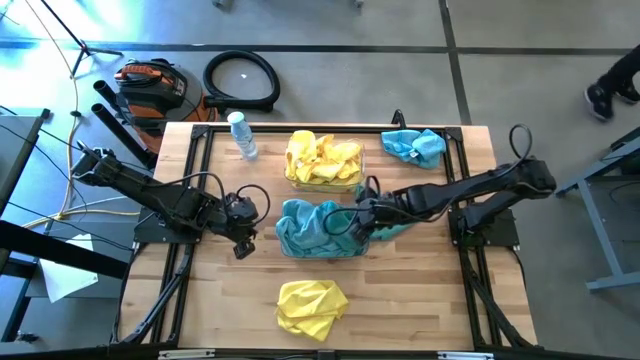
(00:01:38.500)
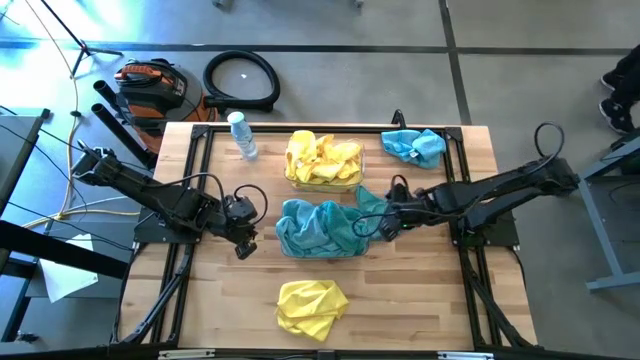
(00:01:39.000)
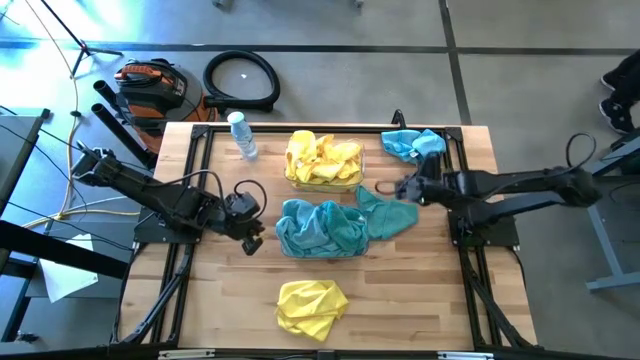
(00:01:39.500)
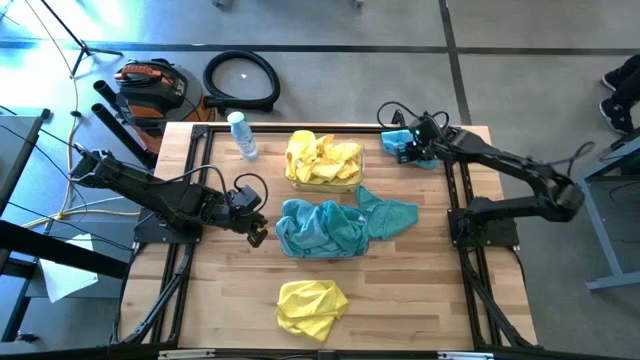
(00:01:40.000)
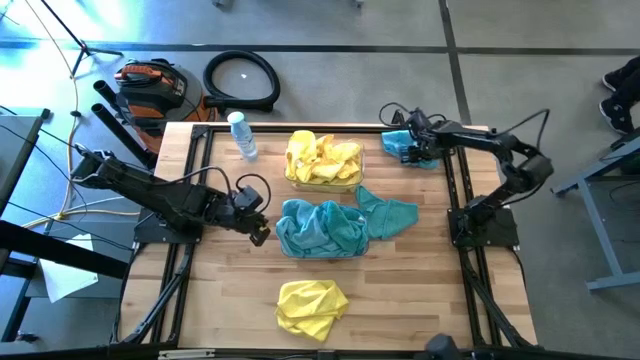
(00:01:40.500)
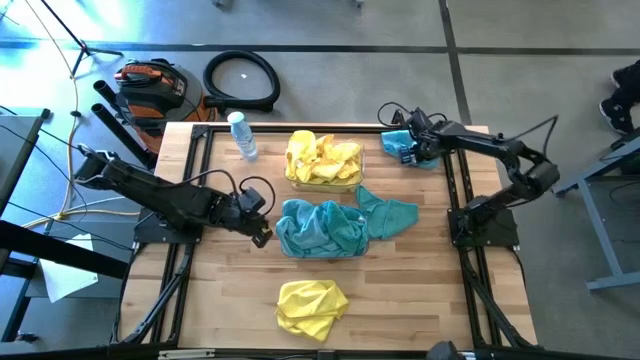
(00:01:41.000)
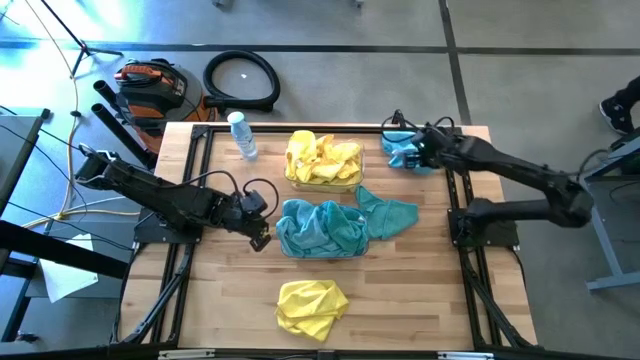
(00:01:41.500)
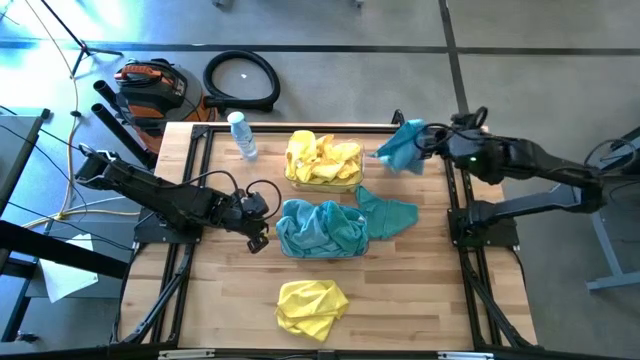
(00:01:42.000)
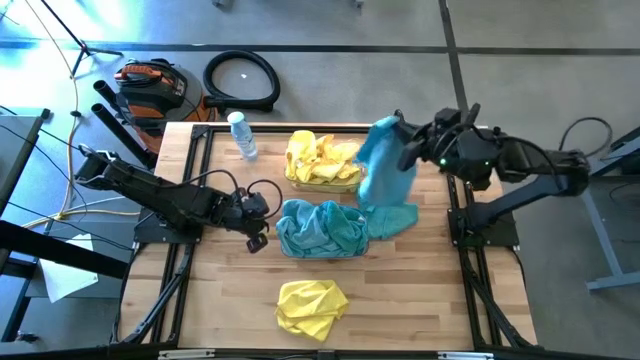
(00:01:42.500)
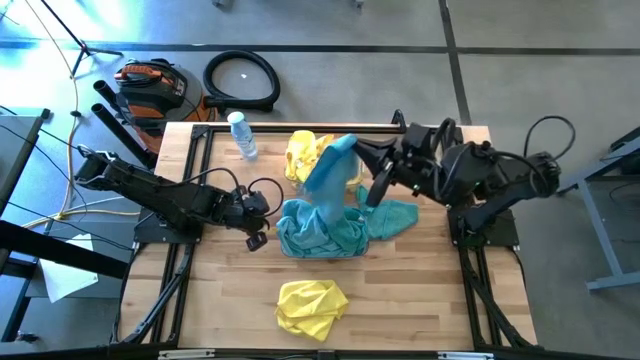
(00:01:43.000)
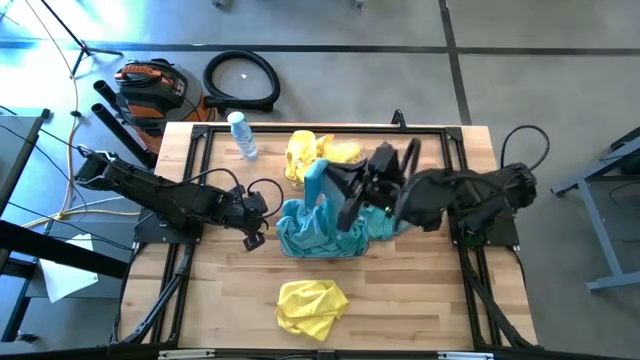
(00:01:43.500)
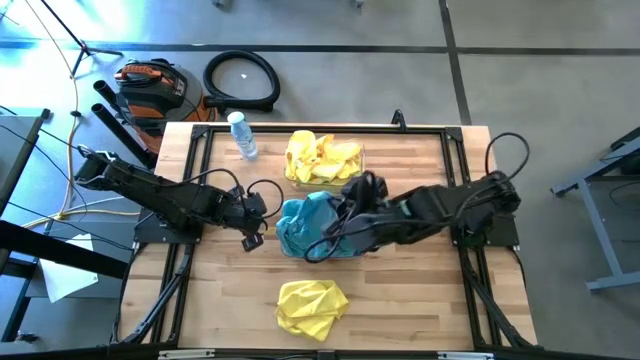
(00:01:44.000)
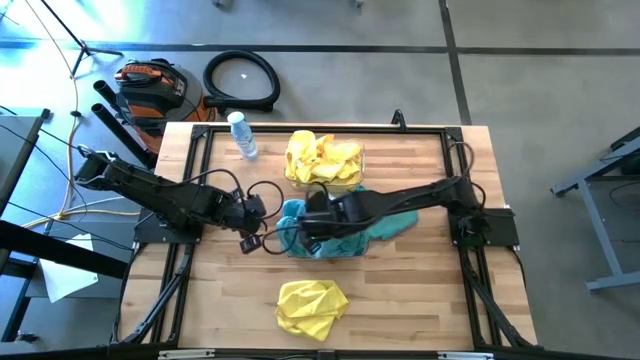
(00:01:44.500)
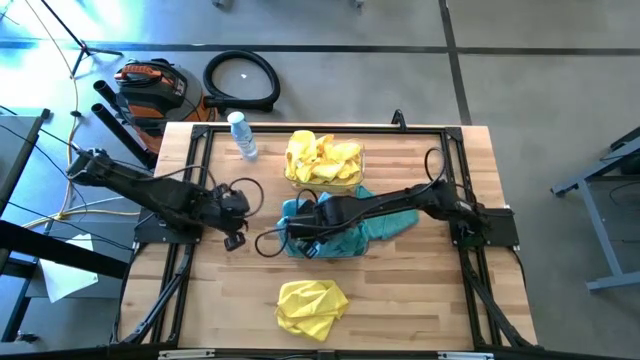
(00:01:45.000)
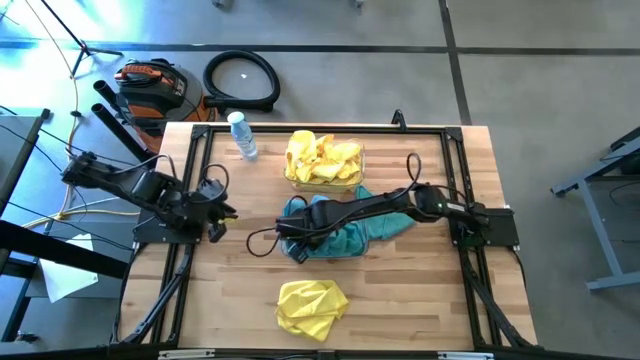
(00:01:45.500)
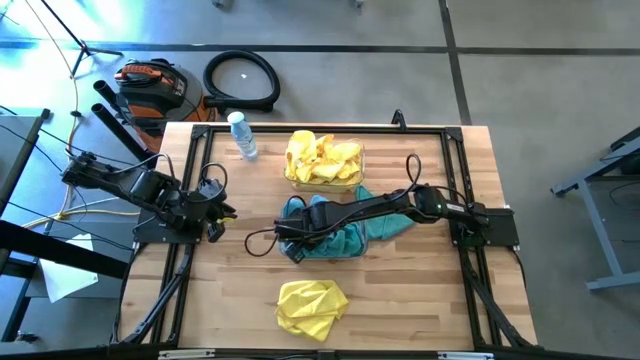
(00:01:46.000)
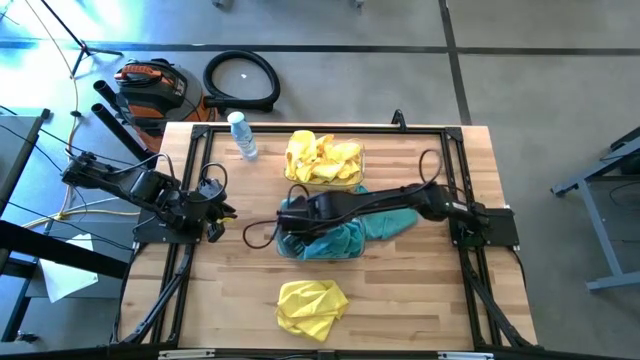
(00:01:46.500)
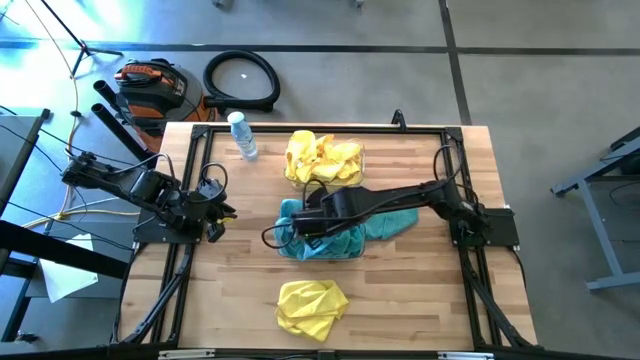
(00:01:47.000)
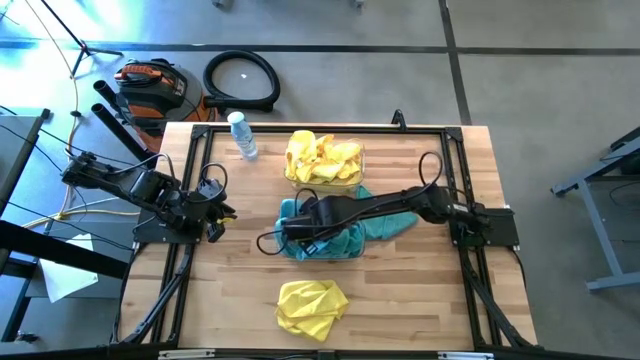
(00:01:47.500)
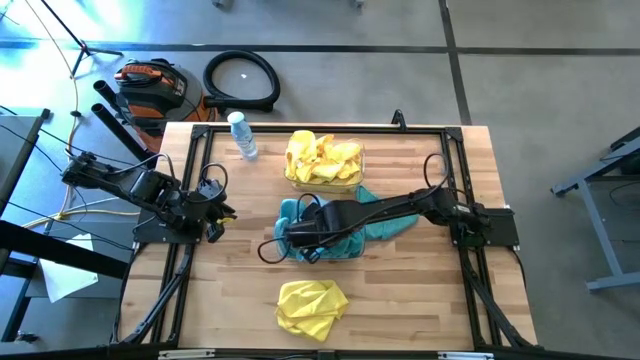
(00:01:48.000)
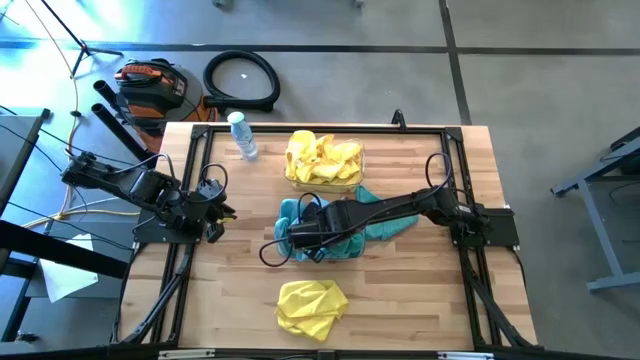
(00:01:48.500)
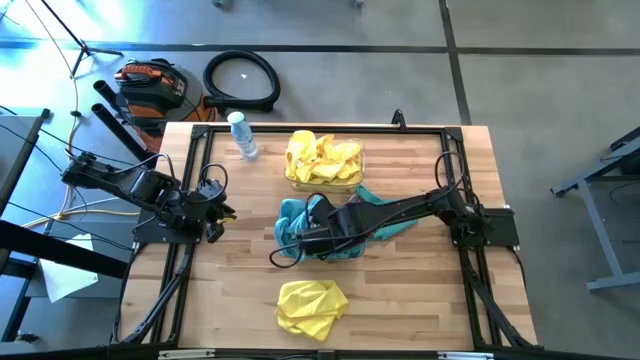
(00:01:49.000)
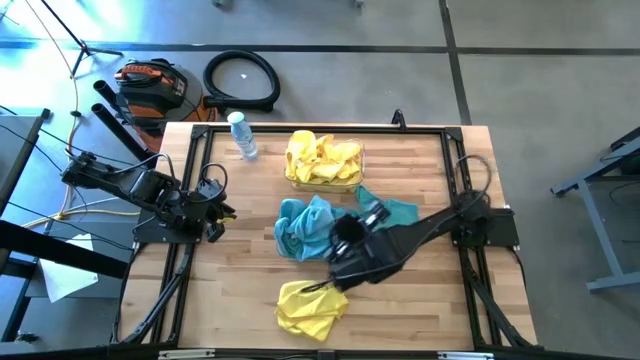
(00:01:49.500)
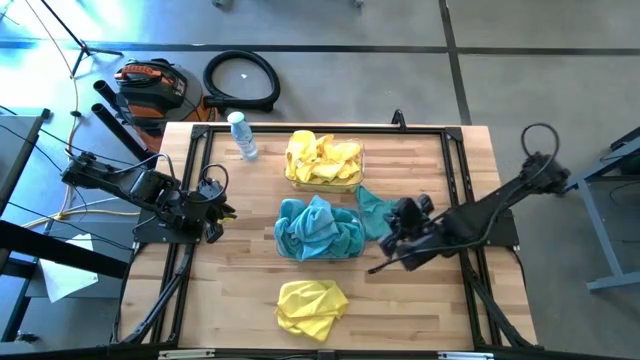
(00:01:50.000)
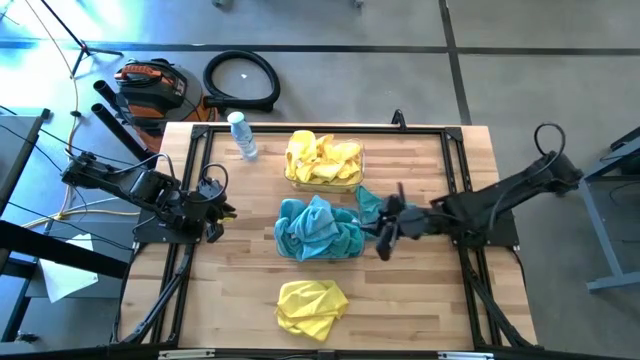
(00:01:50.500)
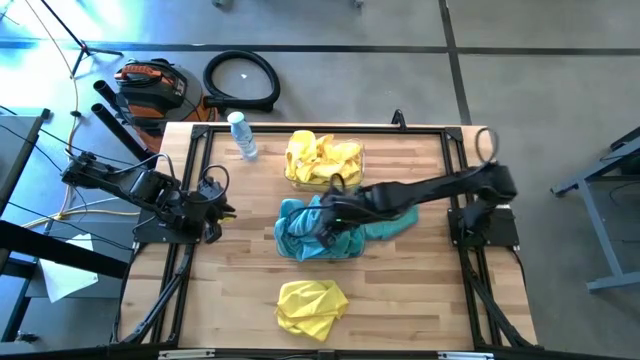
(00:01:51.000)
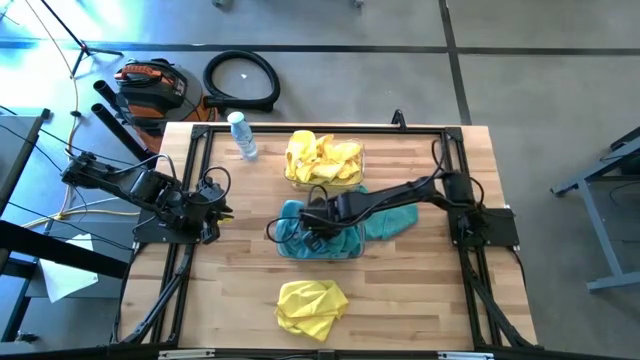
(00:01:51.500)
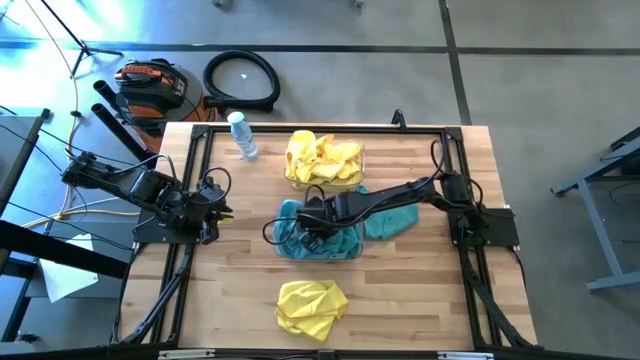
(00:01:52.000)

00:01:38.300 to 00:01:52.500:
Task: Sort microfiber towel by color & place in baskets
Put the blue microfiber cloth into the bottom transparent bin

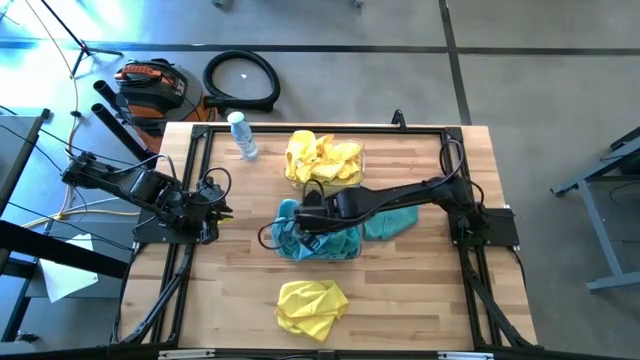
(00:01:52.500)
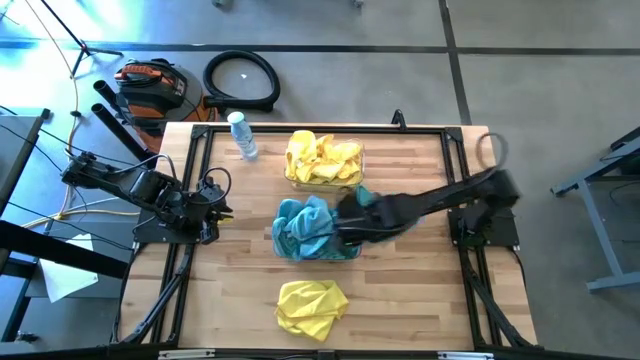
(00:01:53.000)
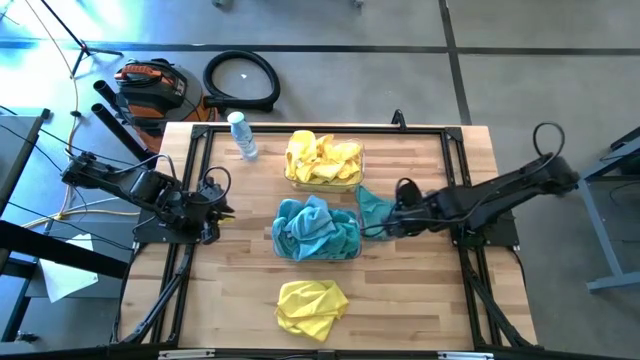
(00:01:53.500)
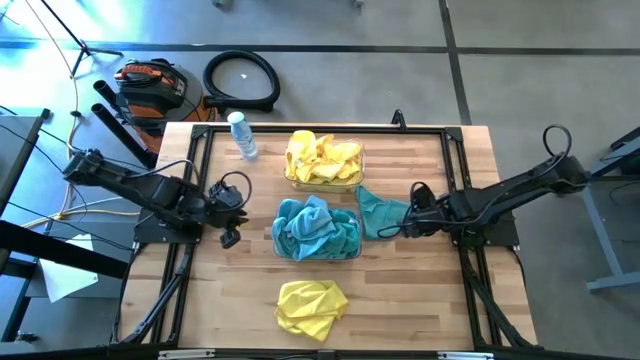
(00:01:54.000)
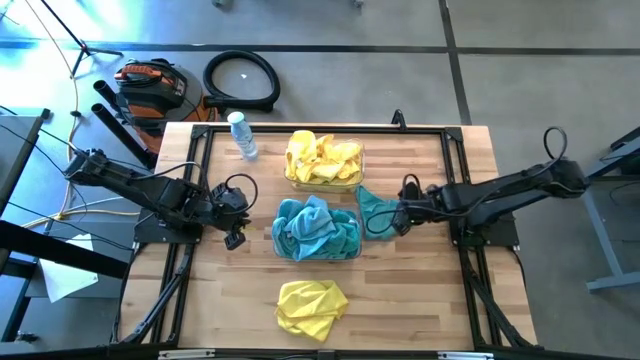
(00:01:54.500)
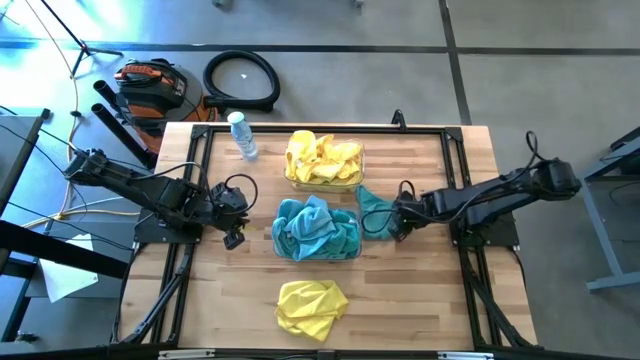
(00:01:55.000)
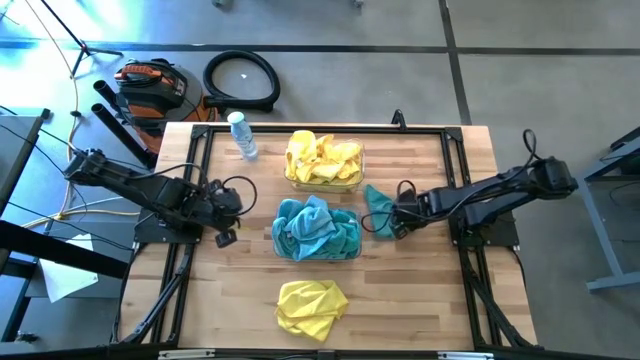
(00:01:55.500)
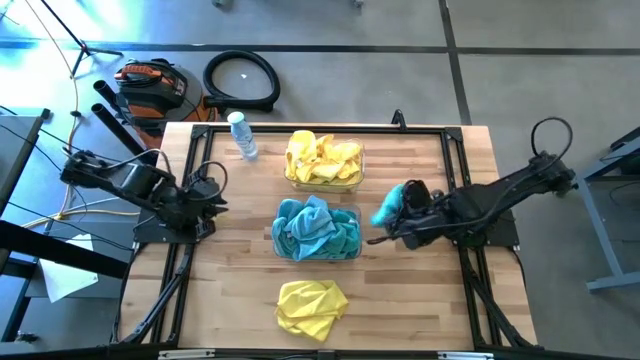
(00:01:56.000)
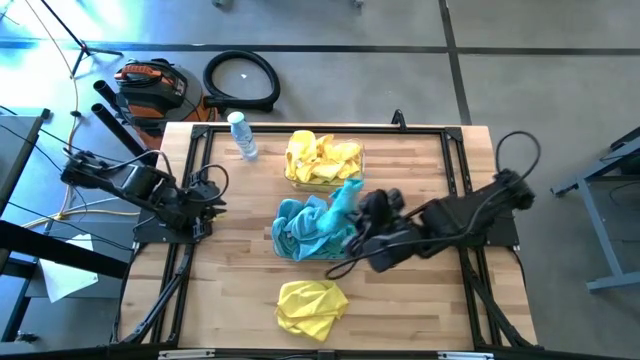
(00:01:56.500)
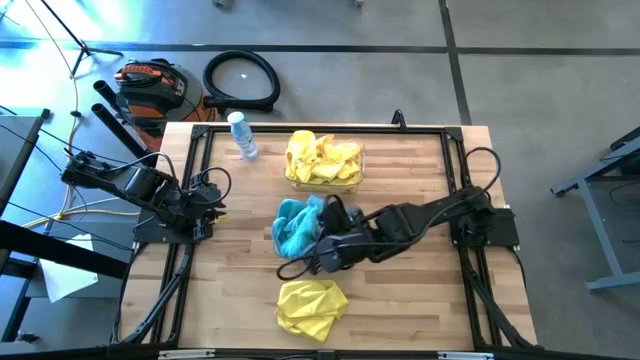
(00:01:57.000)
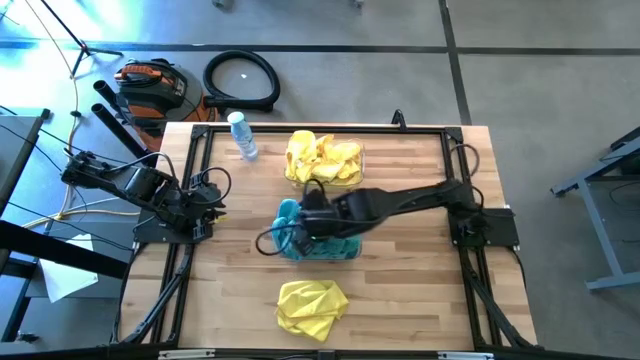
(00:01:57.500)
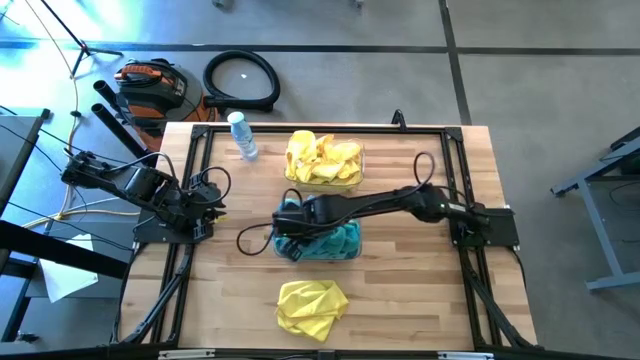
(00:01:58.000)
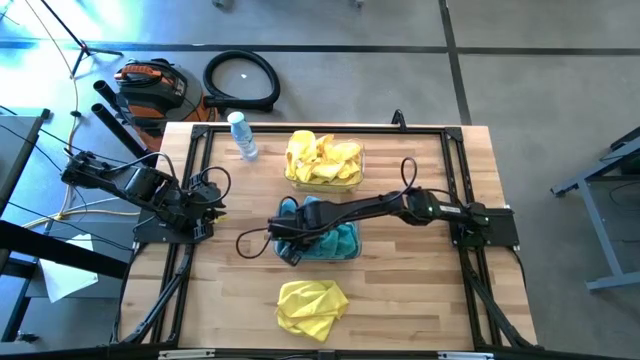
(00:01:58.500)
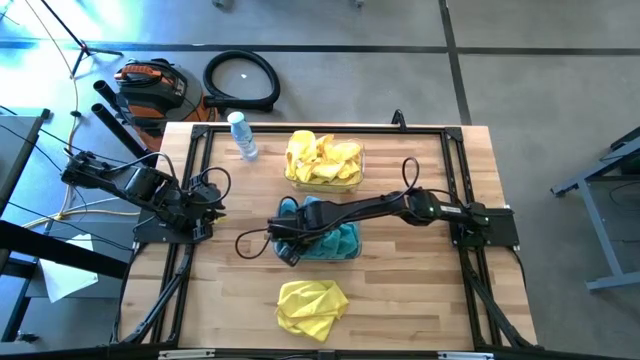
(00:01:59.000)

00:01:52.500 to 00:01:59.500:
Put the blue microfiber cloth into the bottom transparent bin
